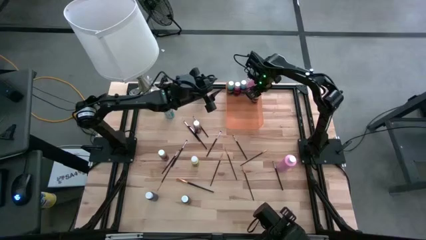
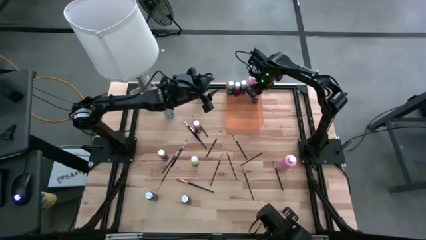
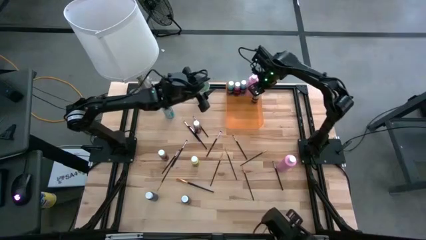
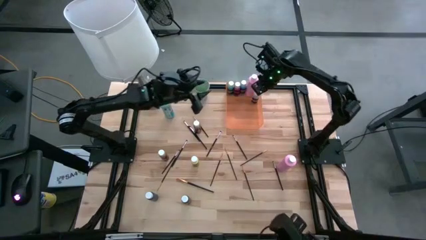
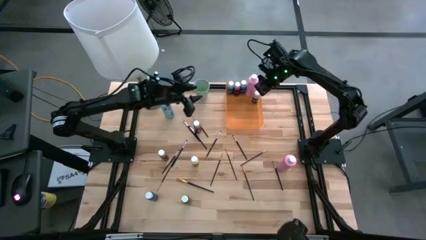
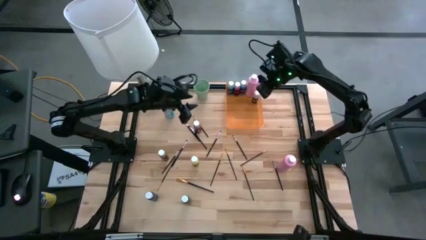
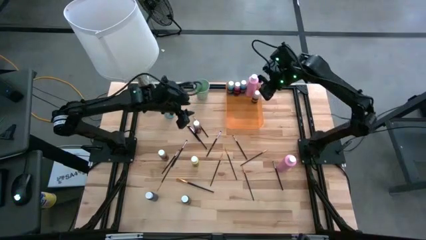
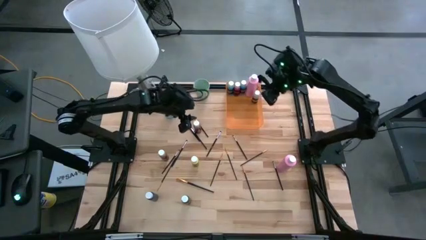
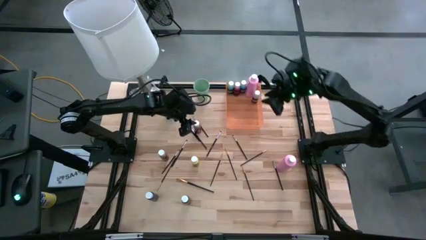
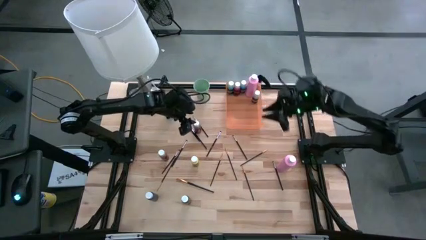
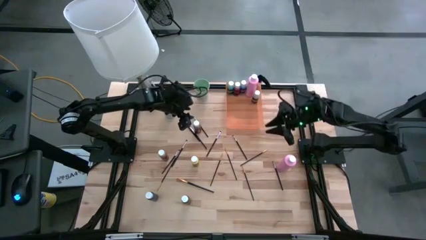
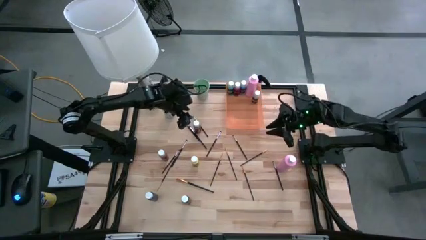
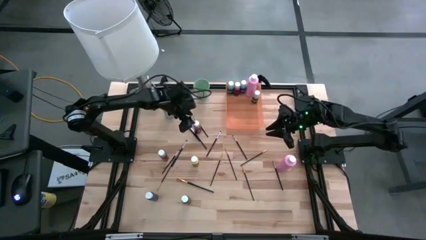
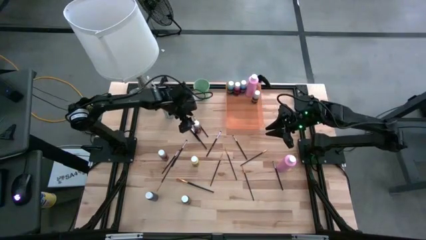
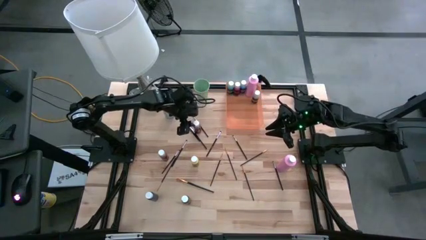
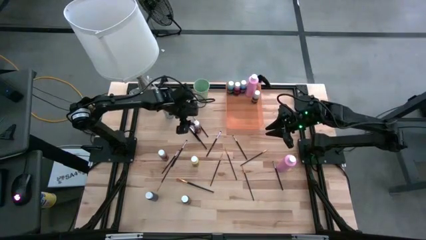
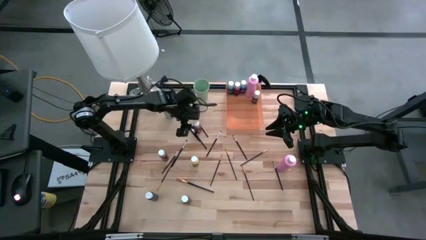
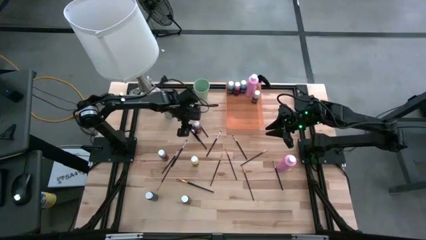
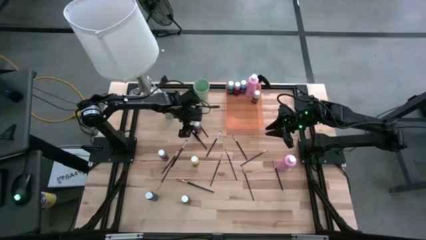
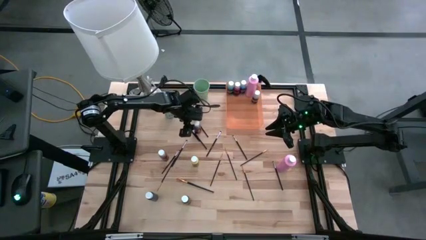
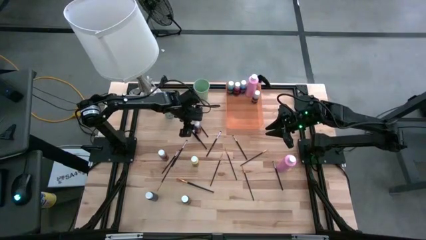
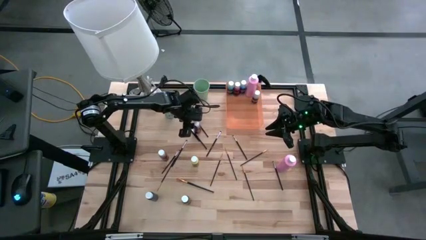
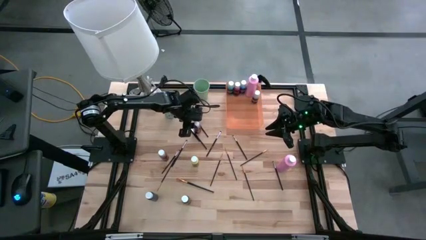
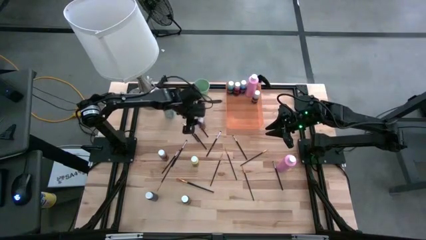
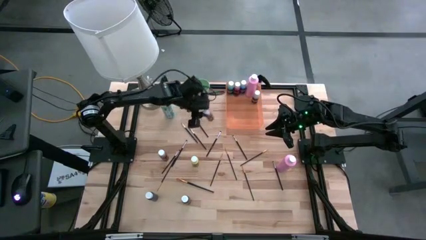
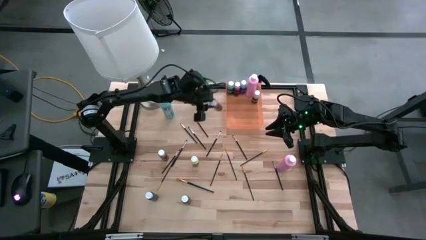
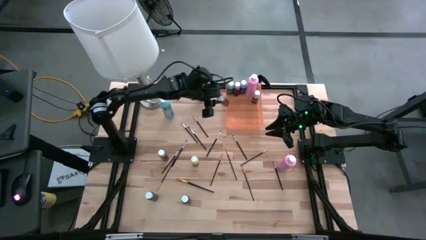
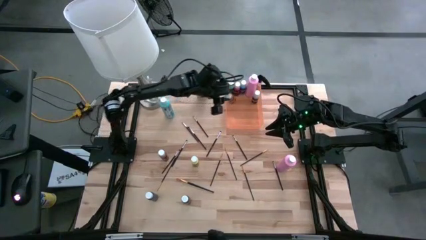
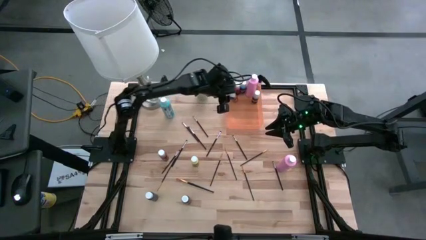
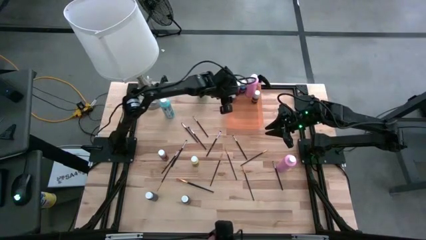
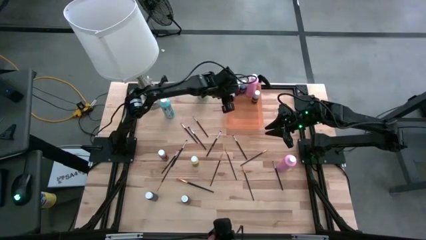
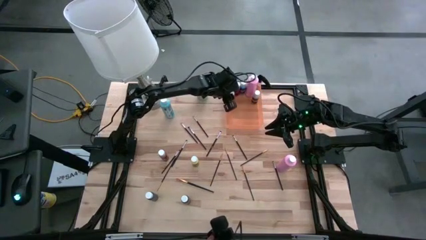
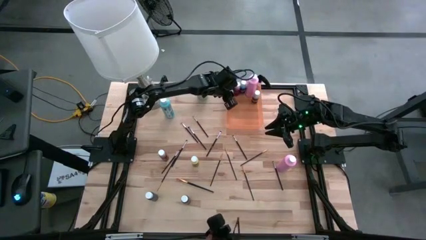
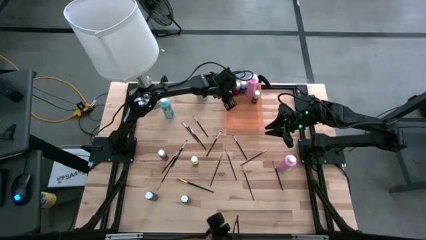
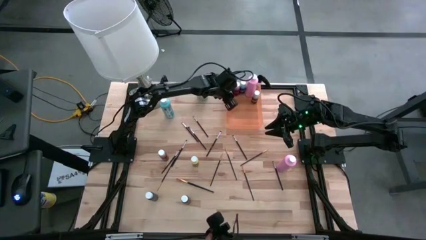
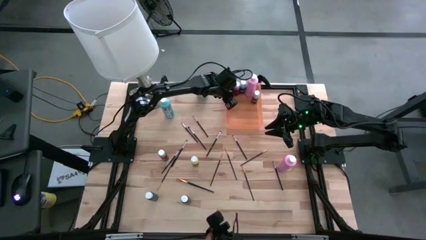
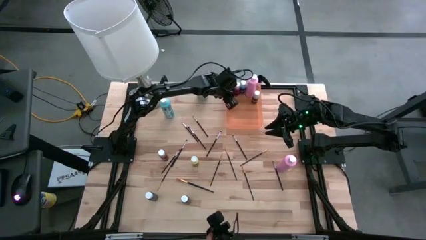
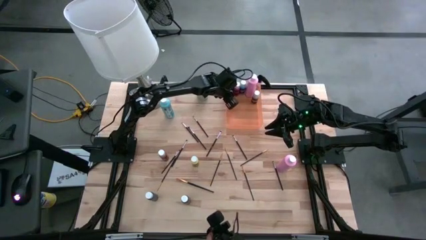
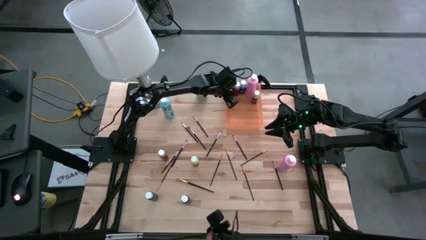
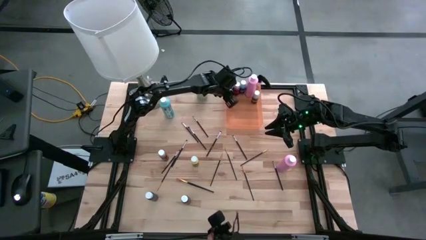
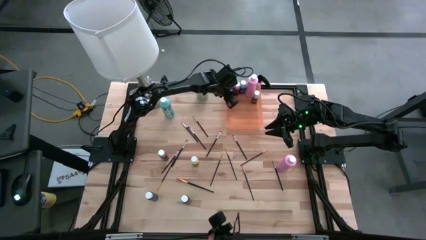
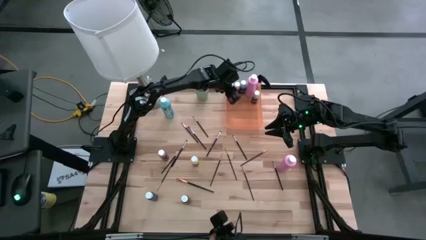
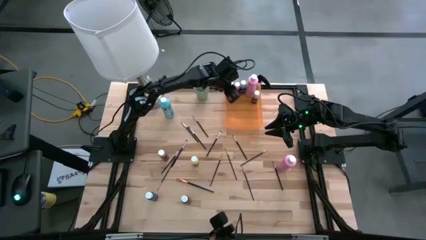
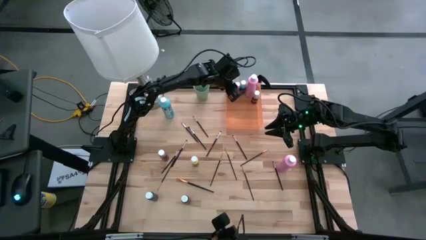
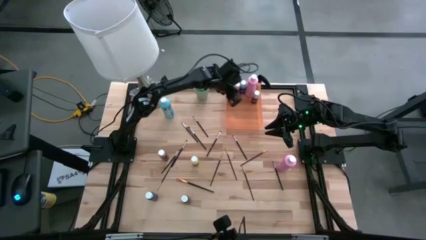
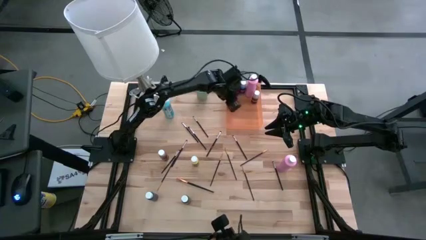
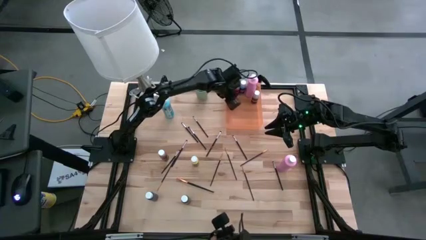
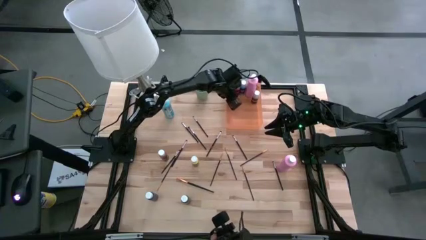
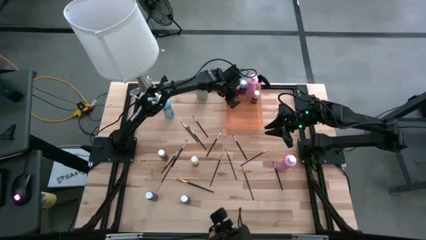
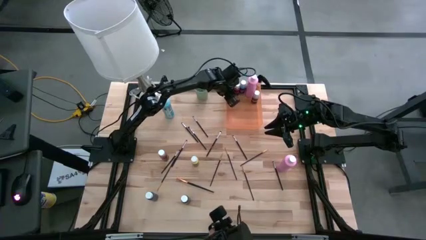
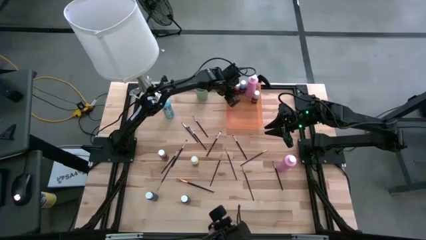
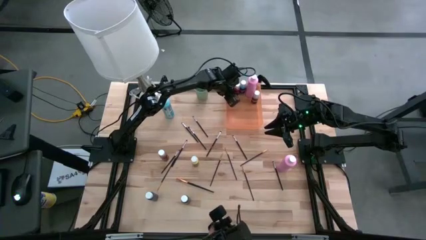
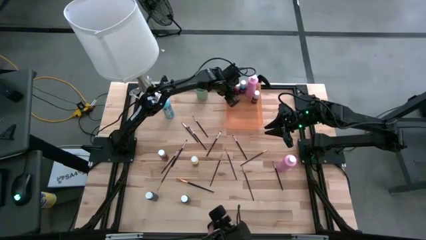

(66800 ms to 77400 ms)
Task: Pick & Place Paint Supplies
Put the brown paint bottle into the orange bin
